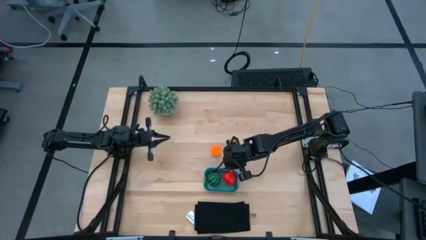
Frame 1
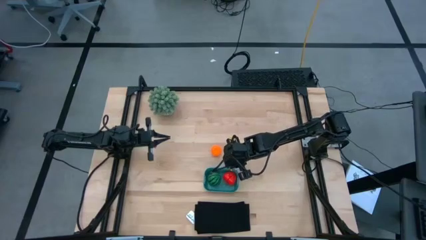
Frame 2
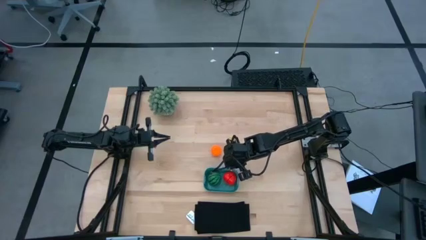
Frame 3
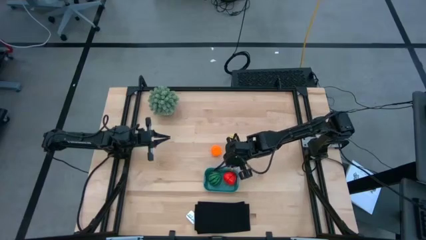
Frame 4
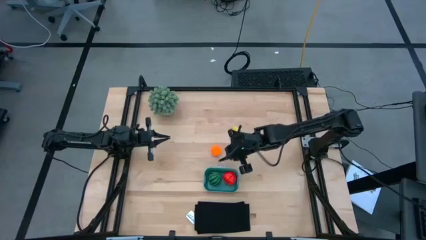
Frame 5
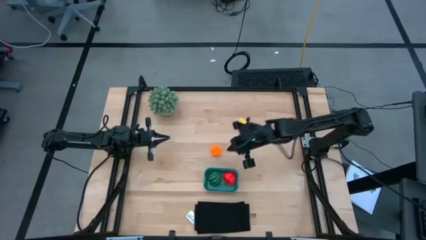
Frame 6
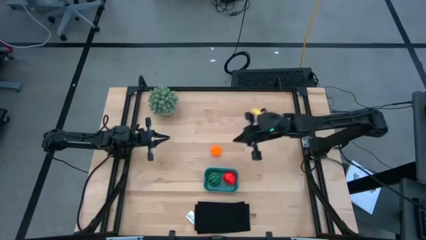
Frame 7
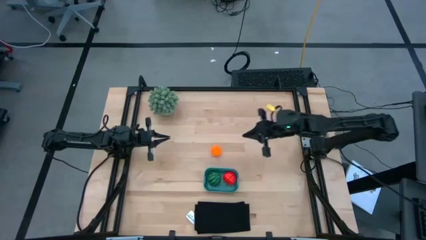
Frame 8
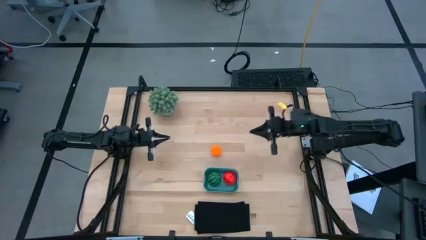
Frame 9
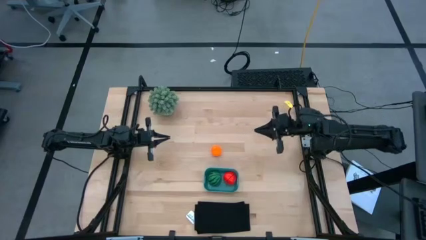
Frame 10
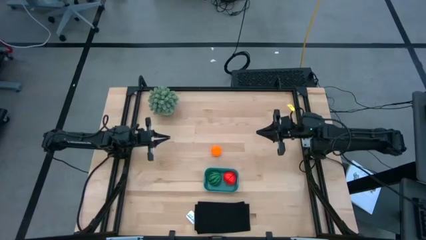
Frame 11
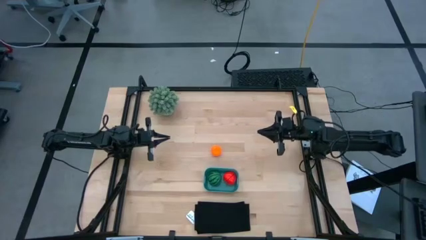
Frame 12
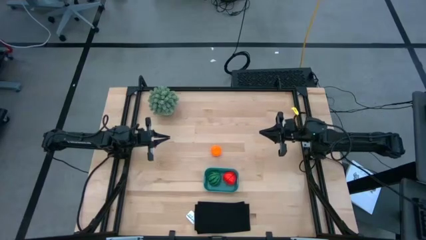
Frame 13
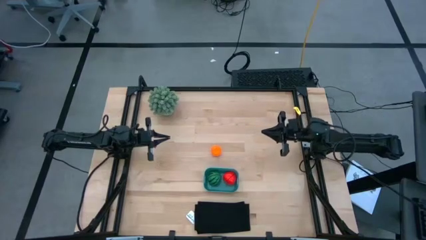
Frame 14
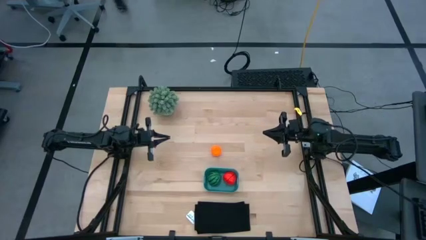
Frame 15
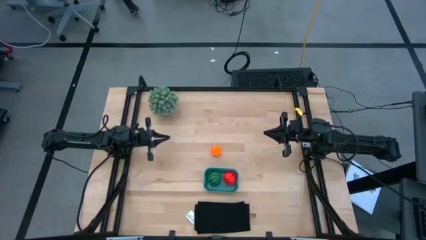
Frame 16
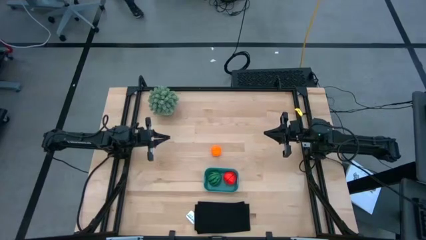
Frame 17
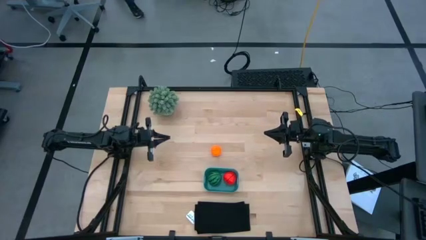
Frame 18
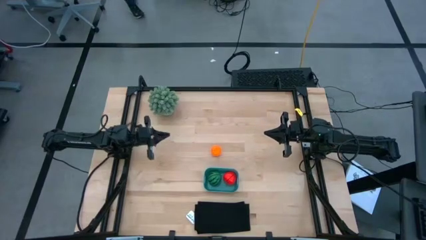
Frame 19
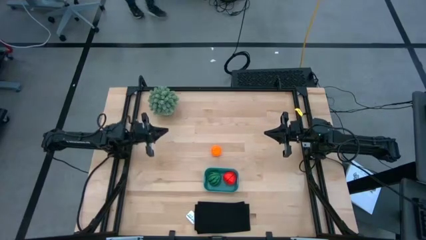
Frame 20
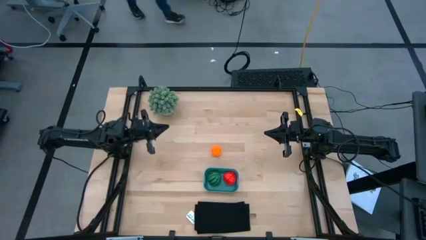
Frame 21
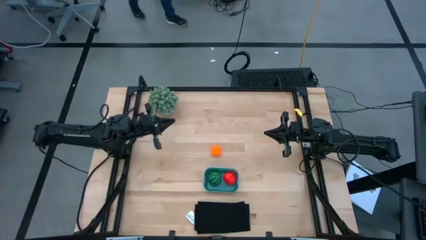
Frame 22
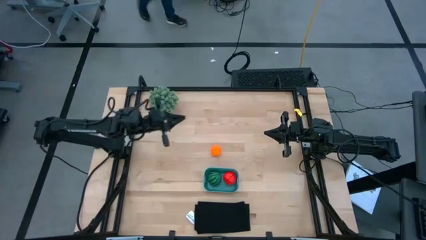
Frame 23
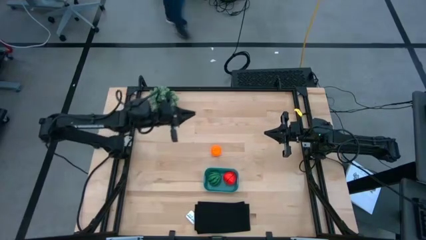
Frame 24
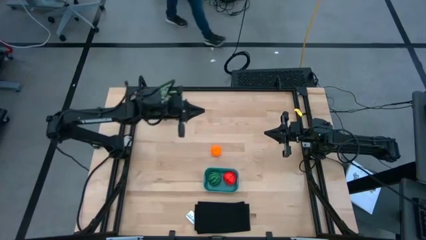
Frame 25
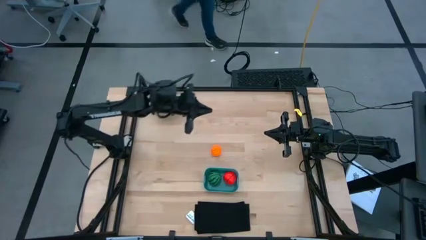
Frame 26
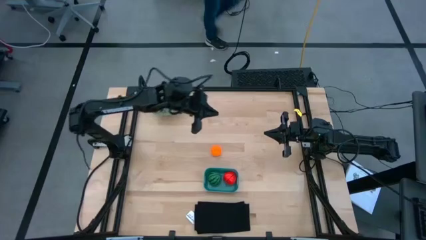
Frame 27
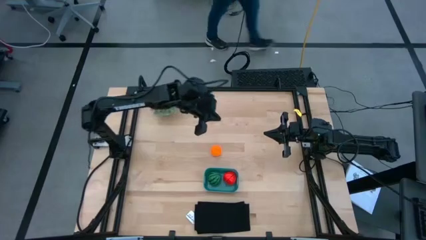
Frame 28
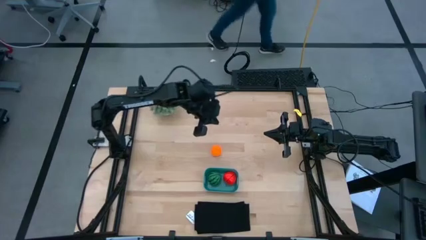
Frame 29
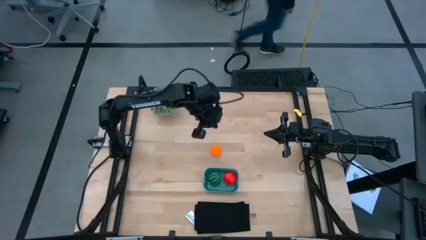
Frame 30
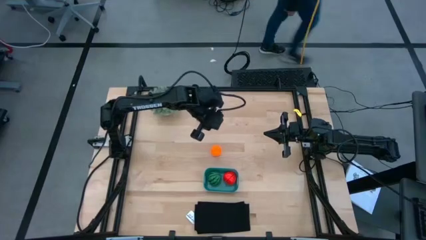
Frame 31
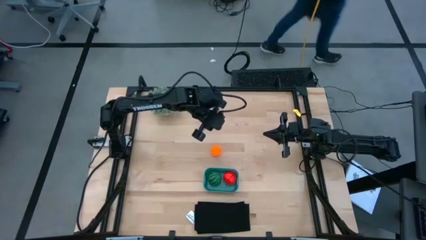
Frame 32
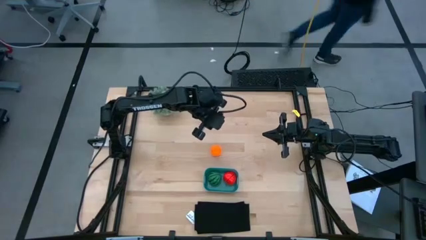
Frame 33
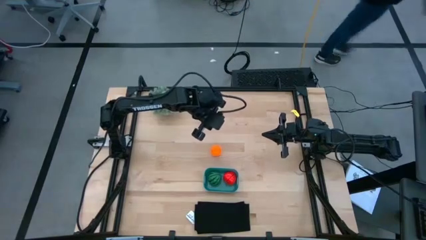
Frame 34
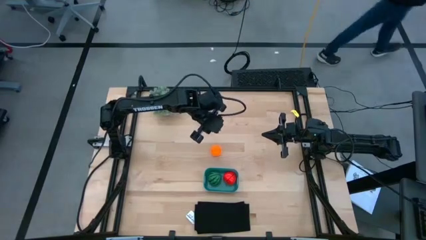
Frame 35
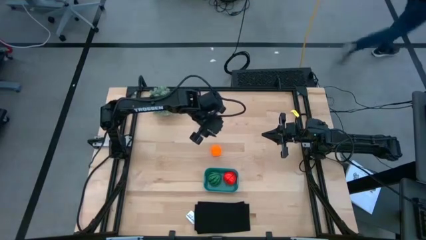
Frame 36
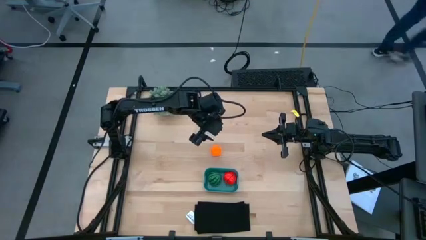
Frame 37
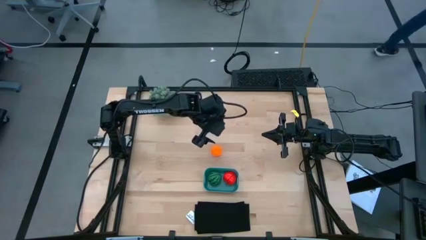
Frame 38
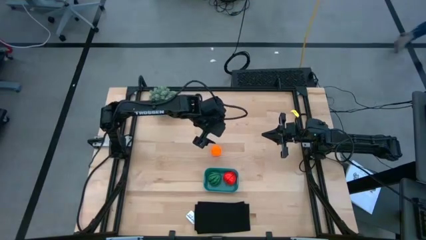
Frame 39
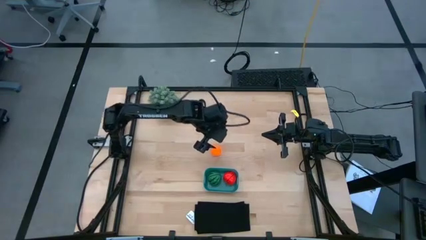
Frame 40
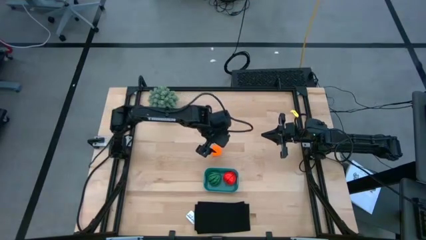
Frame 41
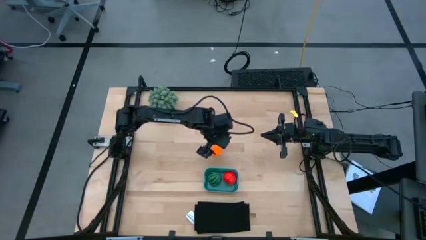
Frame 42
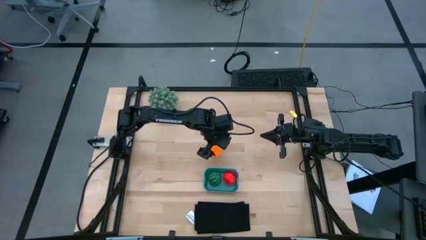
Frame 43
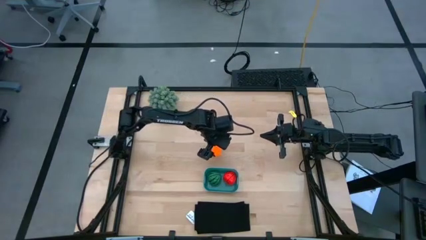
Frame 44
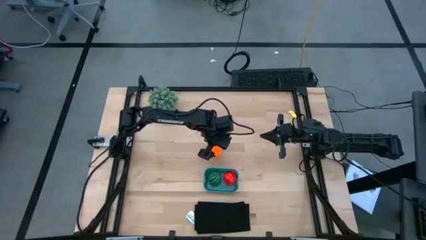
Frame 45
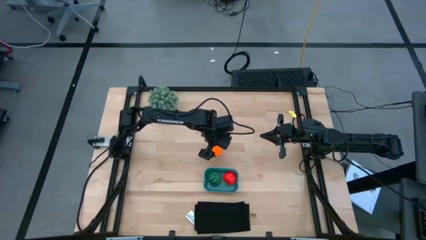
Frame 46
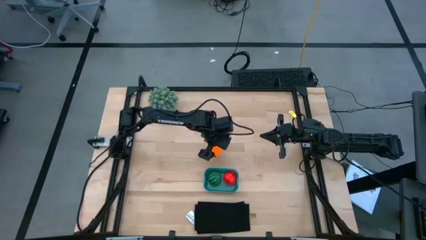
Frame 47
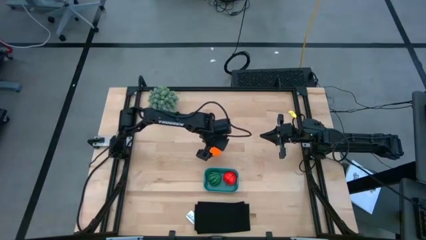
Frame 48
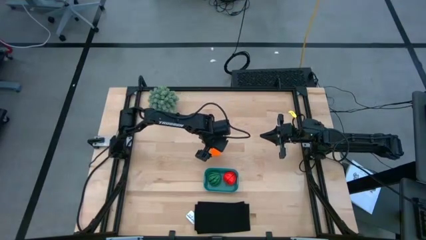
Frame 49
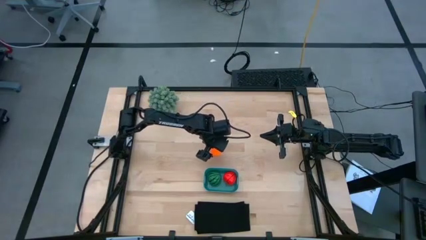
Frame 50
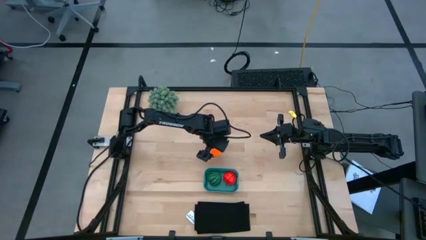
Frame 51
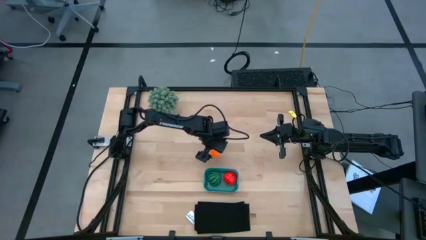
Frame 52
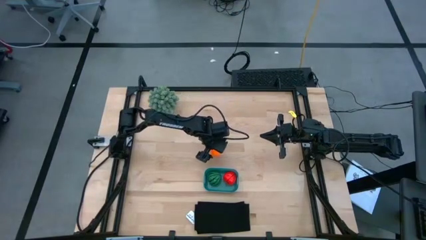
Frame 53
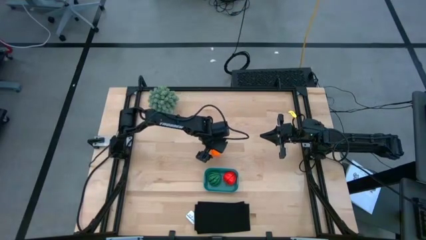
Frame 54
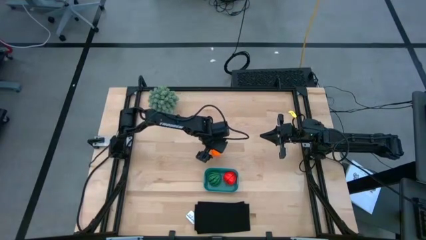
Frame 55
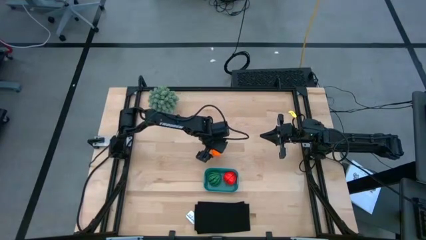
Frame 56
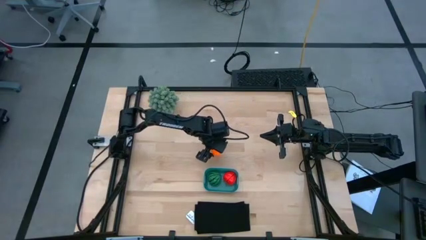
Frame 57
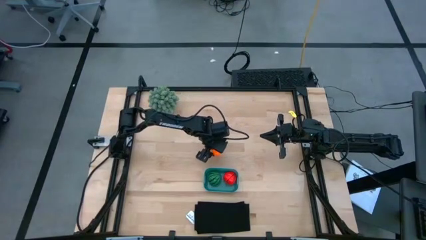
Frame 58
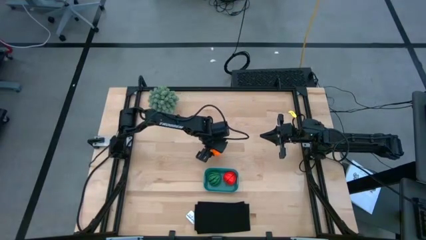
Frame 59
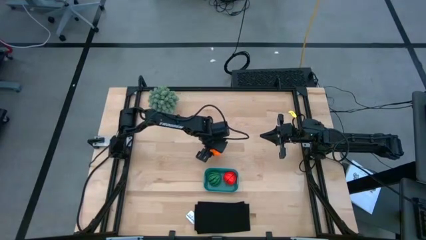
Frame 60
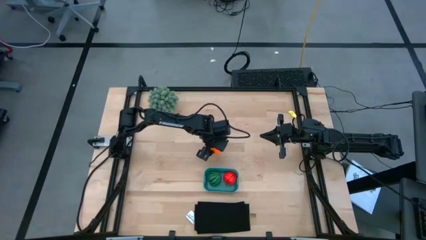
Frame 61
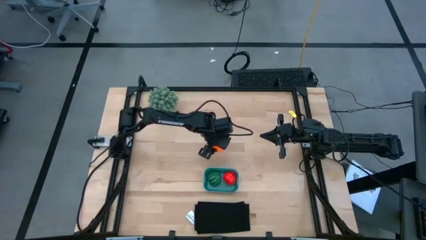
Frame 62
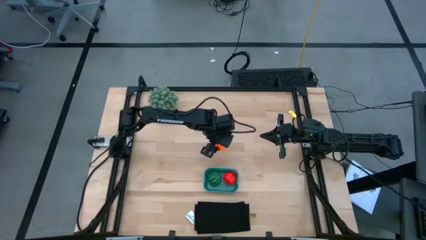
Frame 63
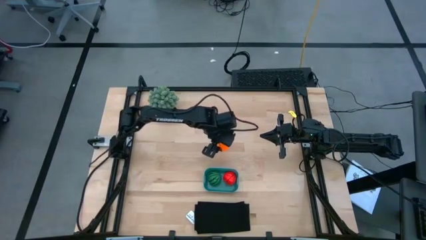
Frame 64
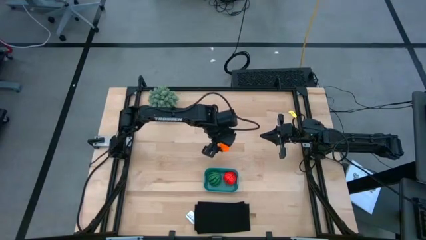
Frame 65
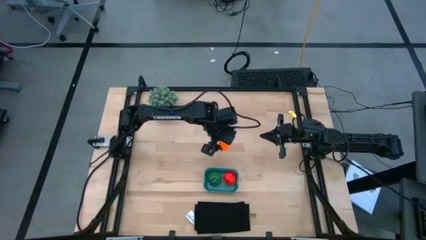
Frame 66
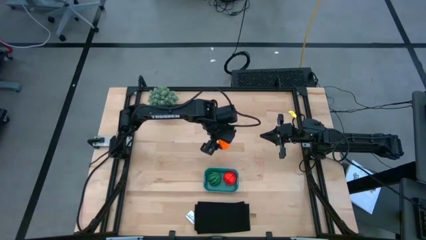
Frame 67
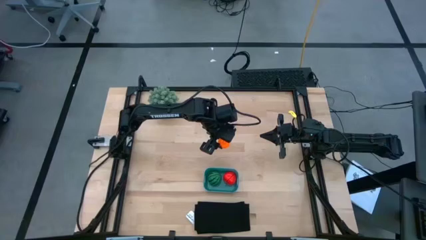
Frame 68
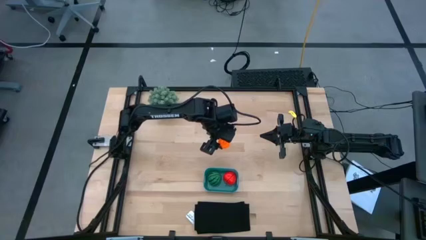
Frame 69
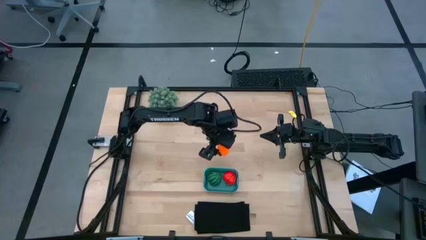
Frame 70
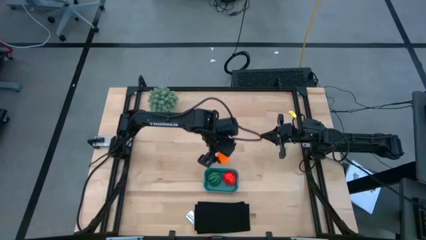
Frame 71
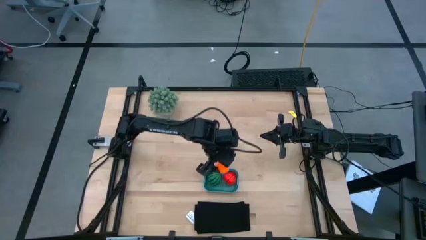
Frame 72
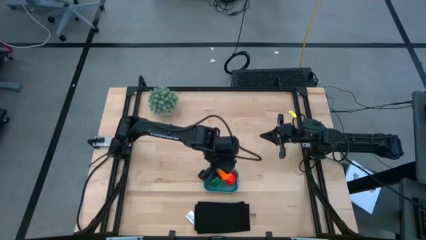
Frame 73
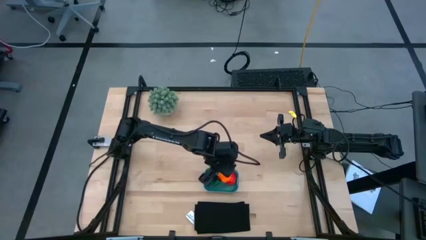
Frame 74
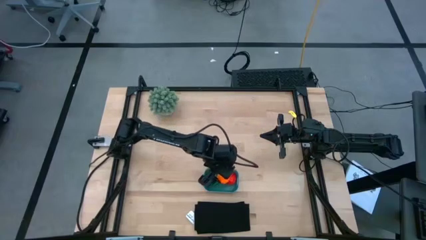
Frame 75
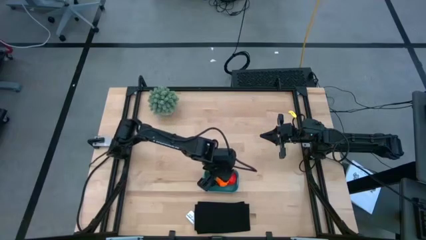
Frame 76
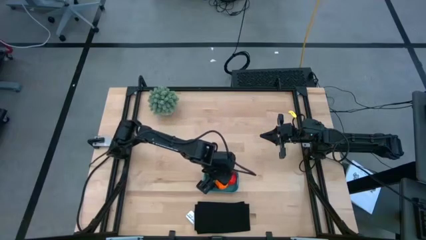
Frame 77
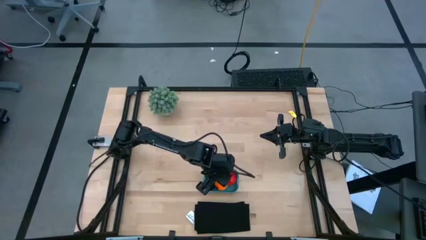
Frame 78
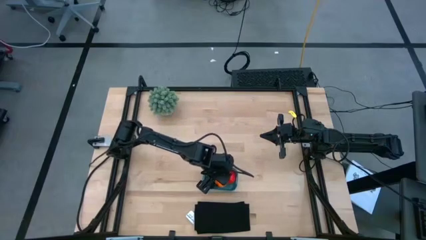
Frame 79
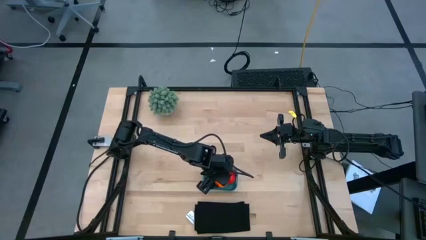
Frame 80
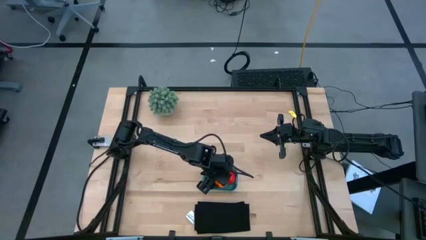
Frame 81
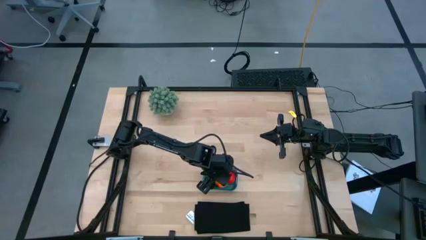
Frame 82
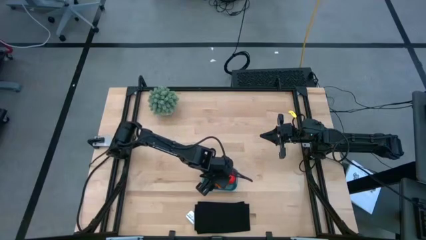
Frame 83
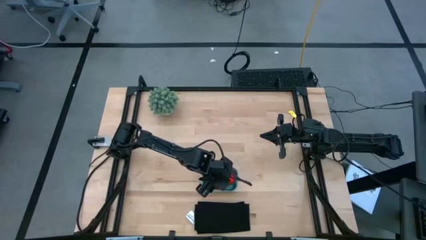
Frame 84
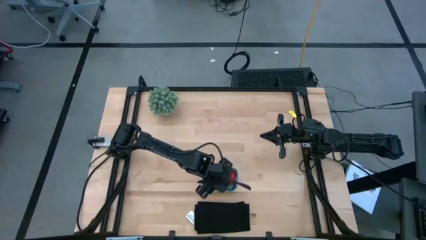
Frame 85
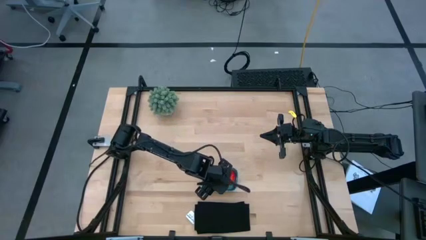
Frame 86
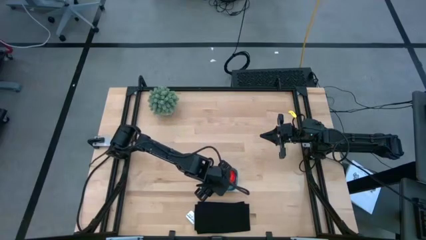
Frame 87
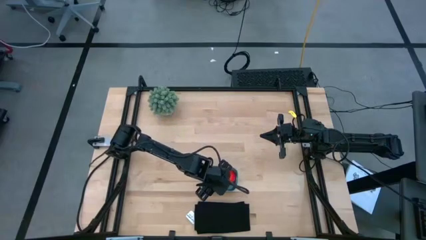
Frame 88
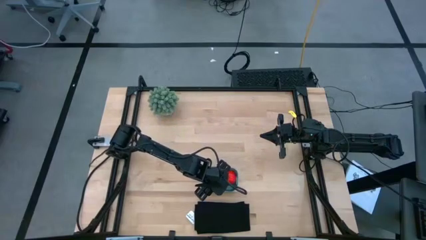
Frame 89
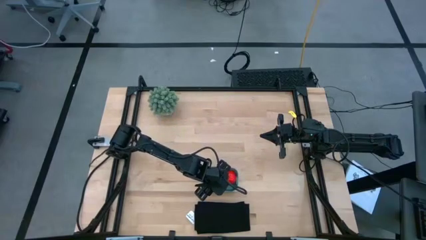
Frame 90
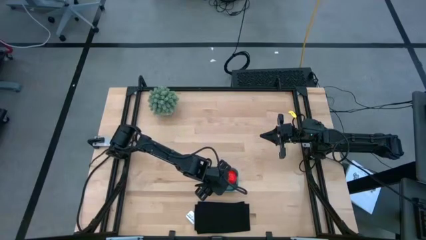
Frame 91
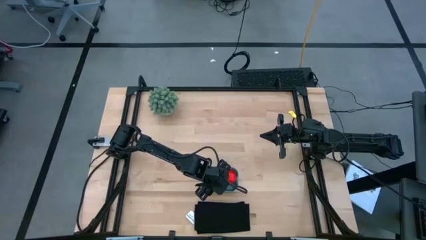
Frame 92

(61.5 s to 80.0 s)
Task: Pick and placing Produce into tupperware
Put the pumpkin into the blue bin
